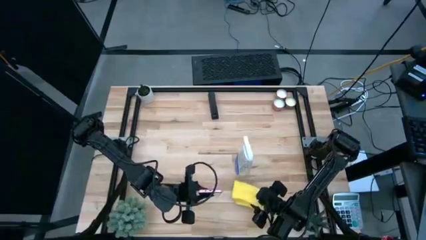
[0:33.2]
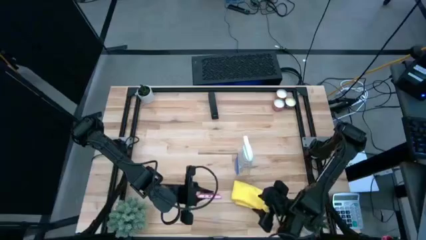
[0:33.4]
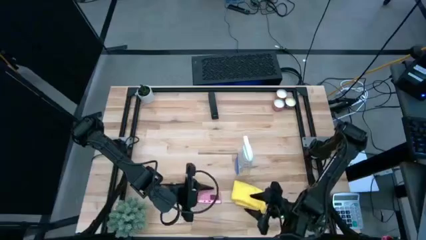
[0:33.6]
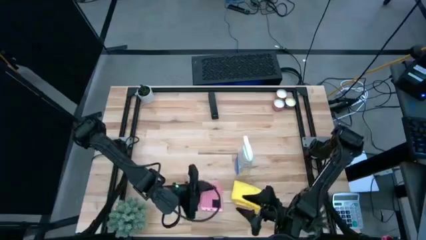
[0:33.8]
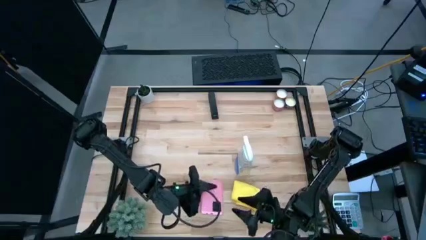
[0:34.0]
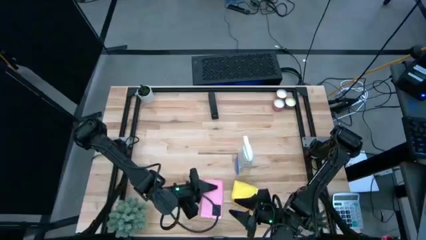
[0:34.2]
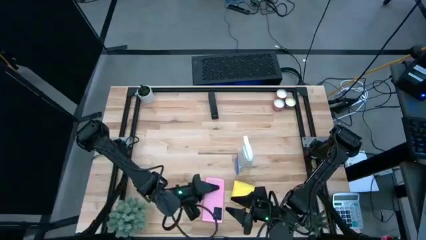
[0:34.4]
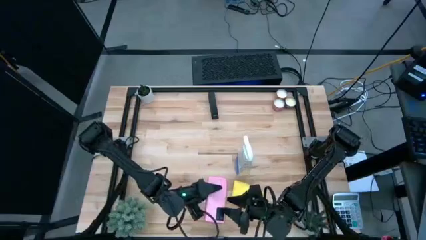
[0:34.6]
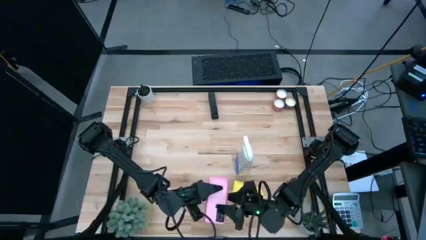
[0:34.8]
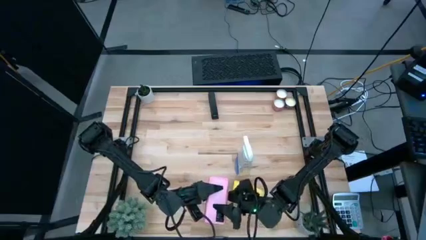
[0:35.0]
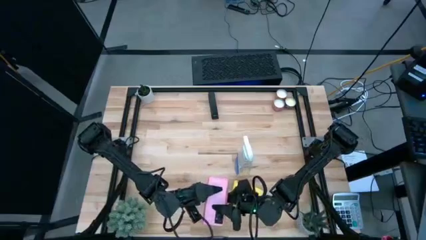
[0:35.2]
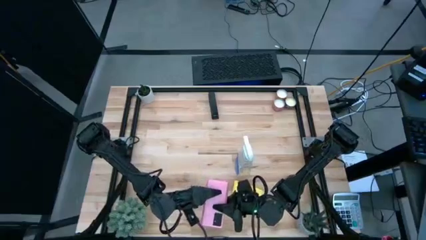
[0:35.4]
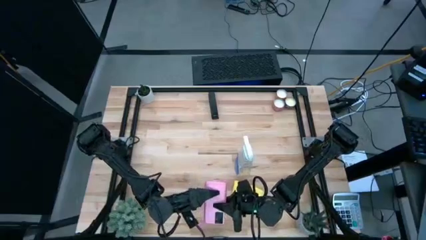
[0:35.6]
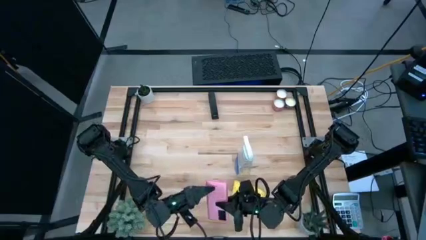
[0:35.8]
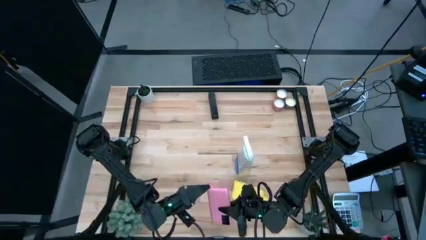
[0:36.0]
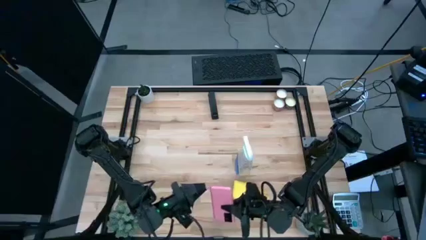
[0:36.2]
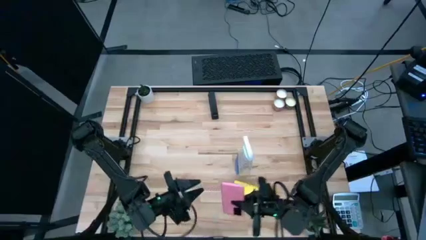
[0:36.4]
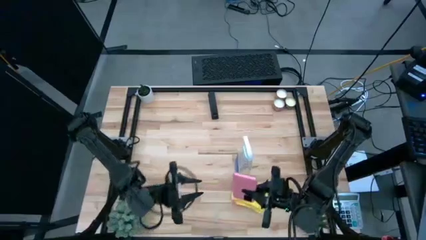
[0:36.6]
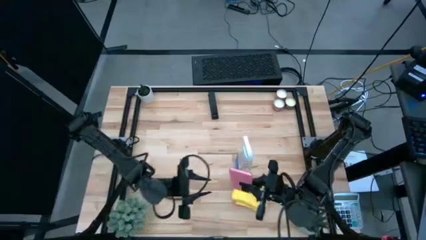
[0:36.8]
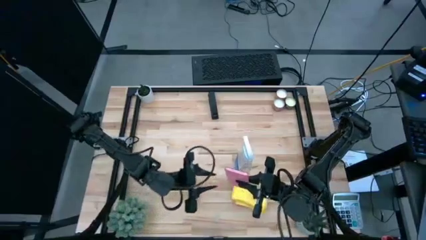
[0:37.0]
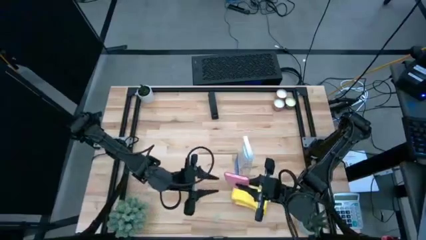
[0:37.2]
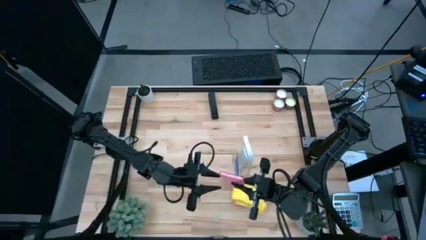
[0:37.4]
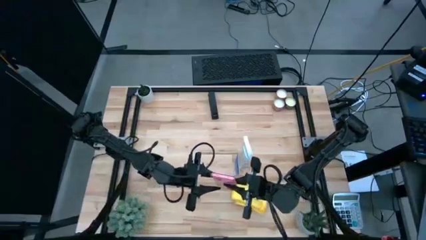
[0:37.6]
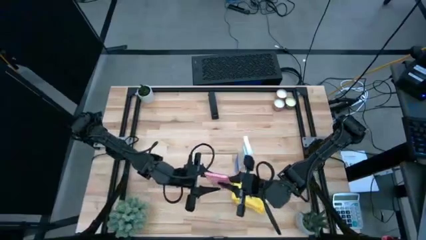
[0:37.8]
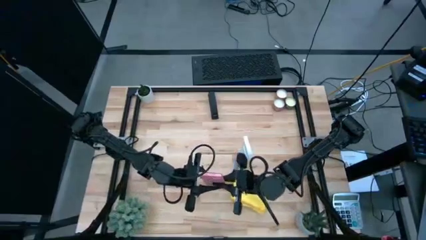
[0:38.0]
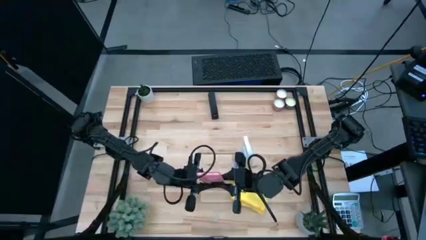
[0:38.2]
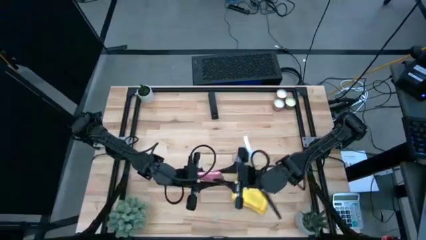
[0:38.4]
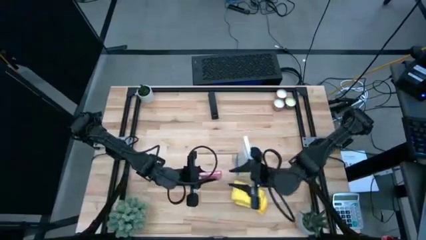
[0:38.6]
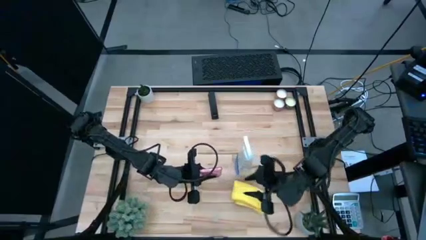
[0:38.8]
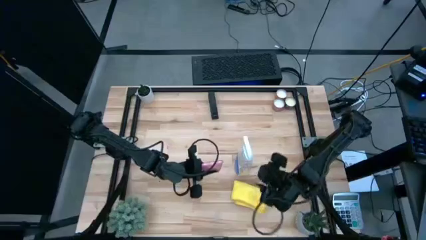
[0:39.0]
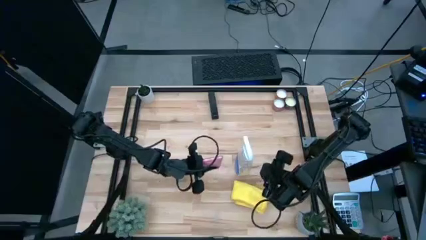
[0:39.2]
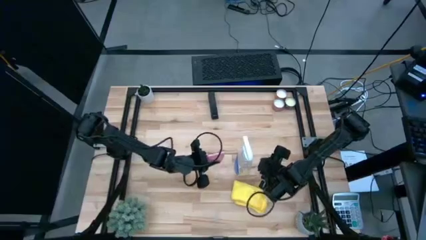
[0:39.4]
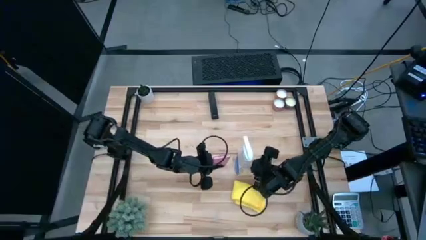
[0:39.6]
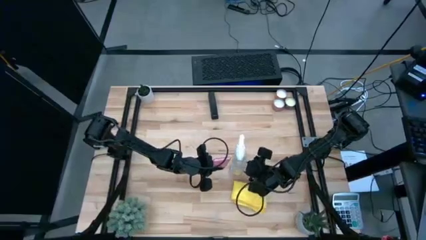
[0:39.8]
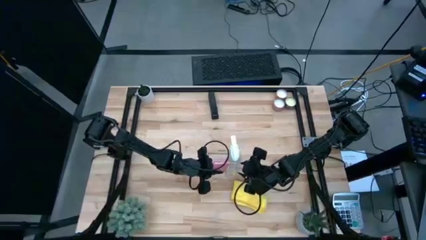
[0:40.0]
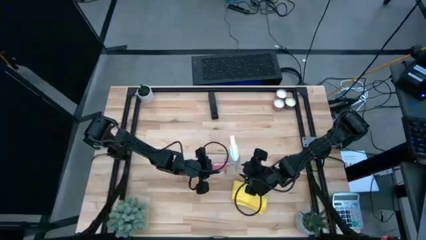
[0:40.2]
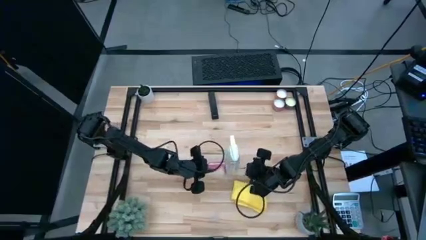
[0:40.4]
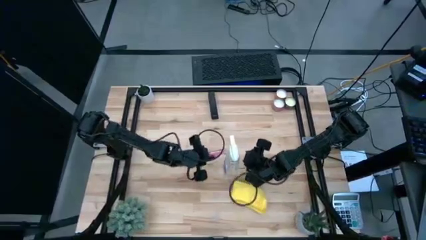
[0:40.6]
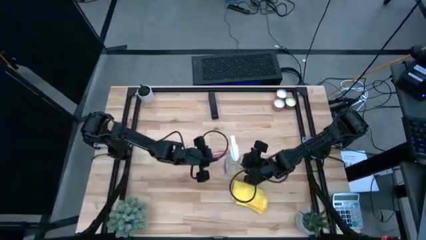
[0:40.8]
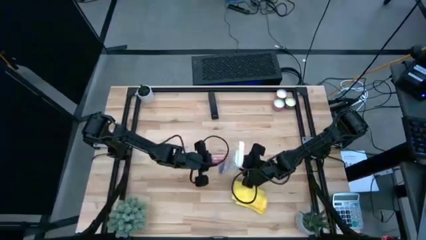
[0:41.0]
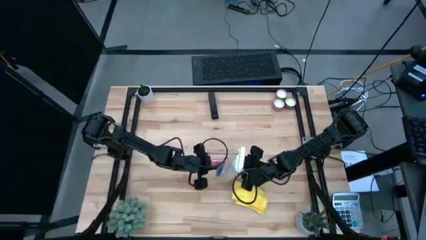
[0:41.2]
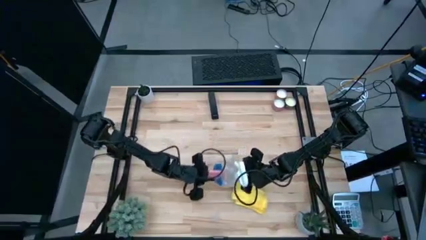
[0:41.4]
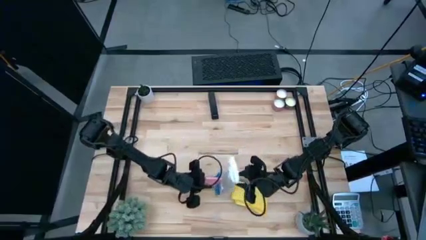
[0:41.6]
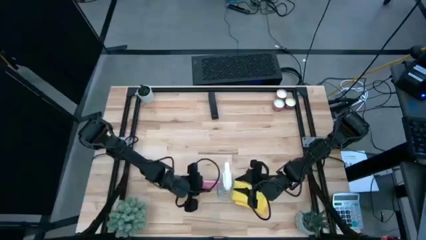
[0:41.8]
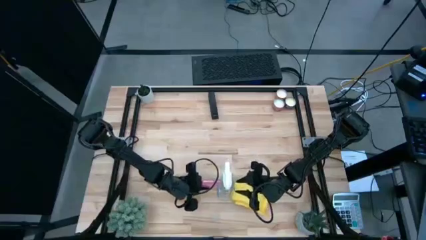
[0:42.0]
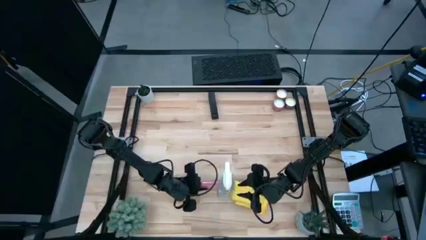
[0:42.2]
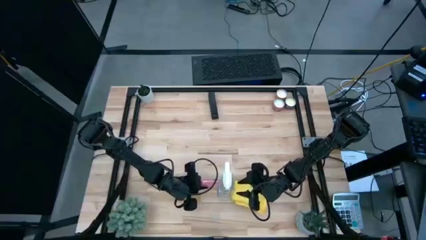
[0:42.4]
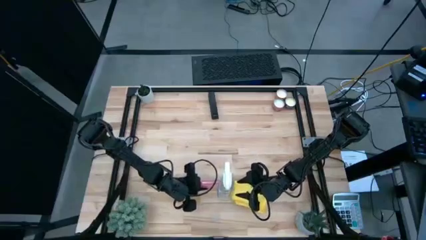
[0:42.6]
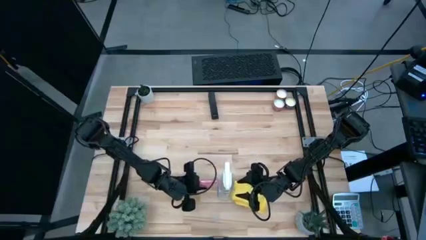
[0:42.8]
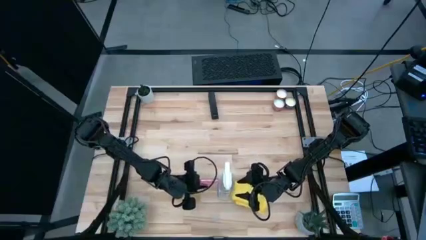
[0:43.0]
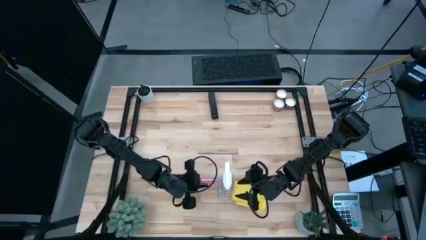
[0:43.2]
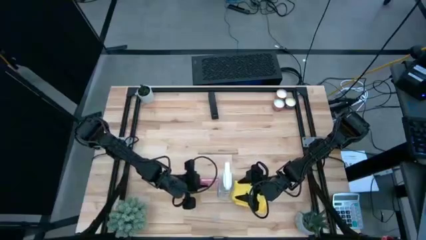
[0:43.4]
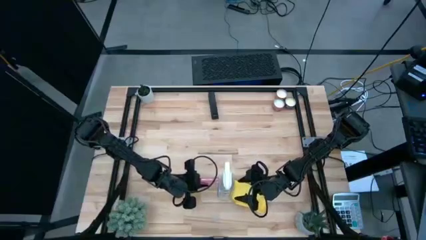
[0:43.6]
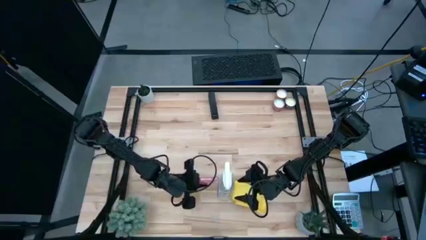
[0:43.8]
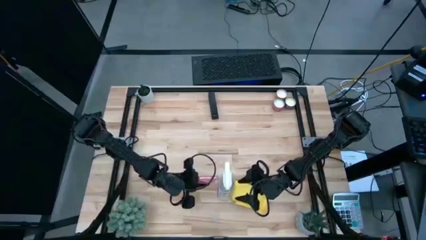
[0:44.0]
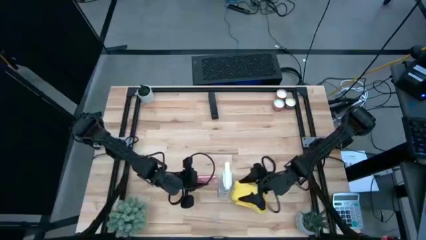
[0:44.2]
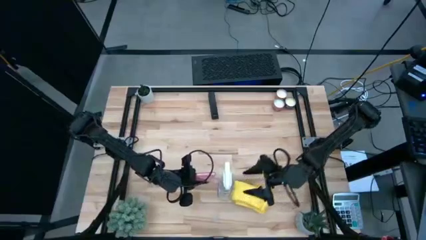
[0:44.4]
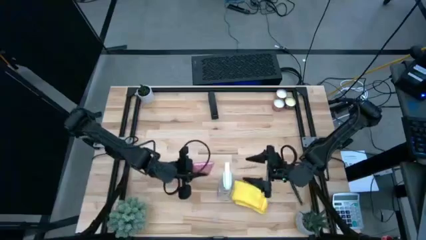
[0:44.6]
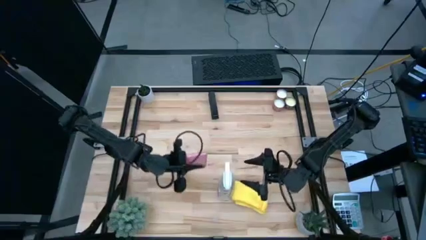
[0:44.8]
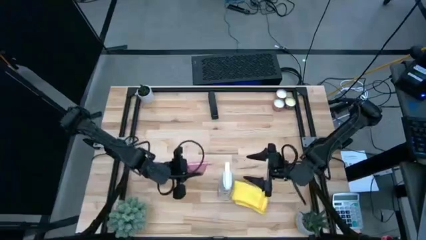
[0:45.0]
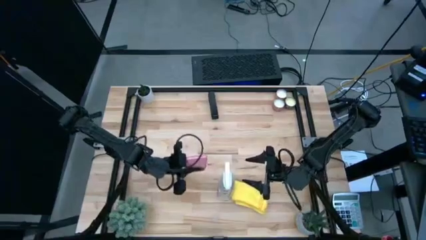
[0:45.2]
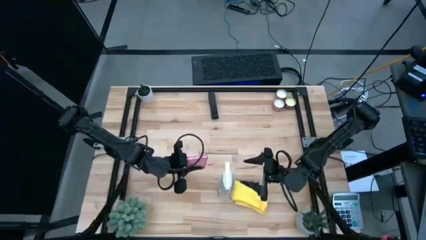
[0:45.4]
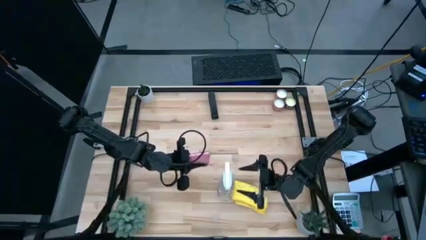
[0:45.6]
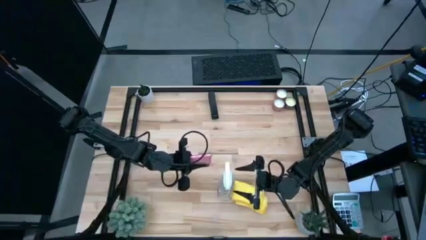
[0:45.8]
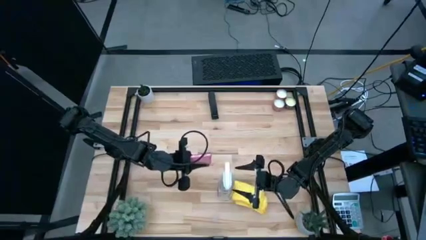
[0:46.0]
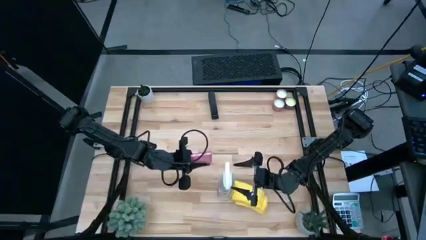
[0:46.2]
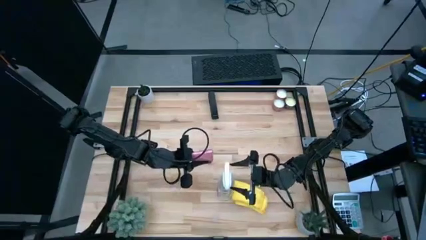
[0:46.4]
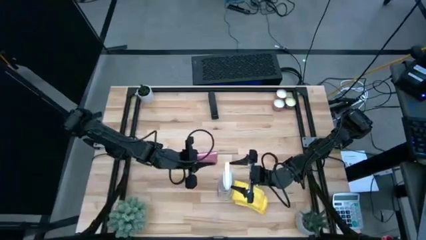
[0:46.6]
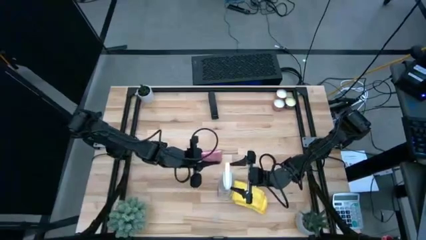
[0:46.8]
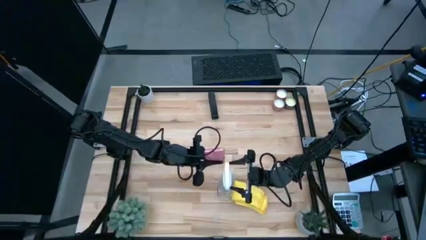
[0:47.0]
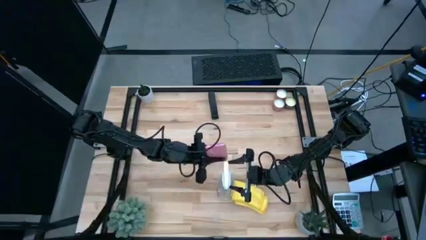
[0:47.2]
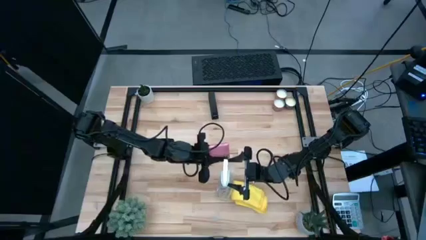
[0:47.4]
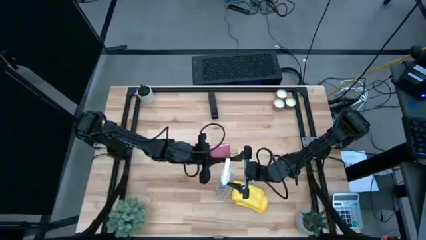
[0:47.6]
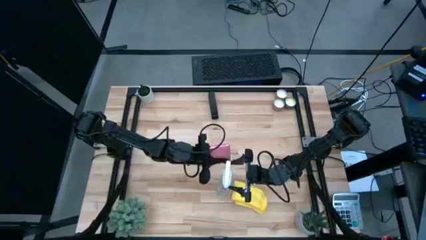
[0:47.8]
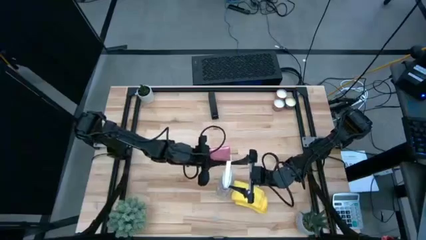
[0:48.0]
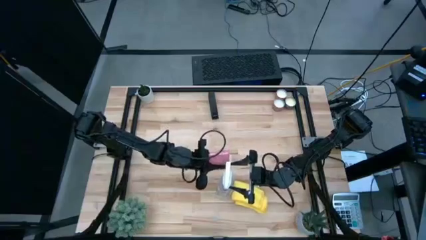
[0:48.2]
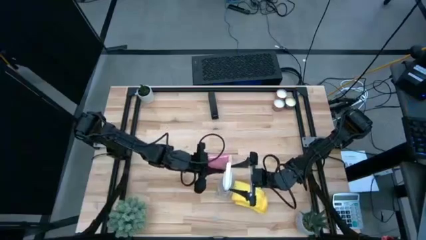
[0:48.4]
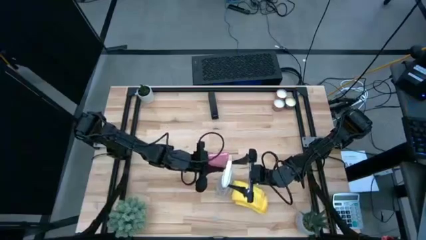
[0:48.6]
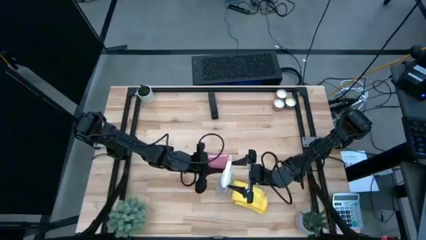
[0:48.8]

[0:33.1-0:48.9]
Task: Apply microfiber cloth
Spray the back of the pink cellphone using the white spray bottle

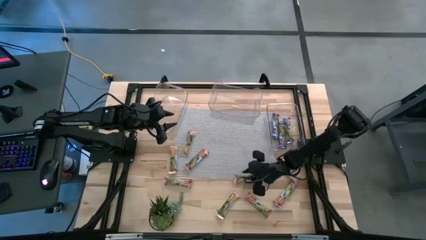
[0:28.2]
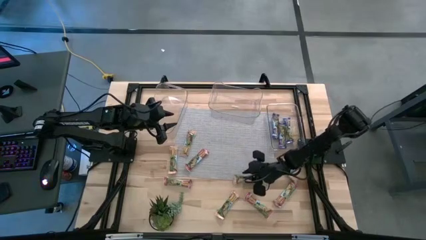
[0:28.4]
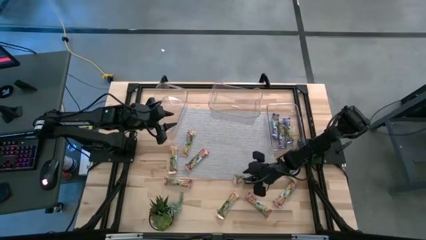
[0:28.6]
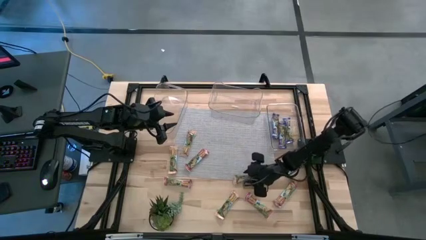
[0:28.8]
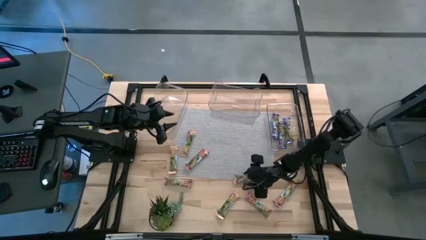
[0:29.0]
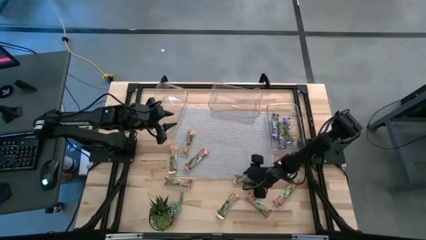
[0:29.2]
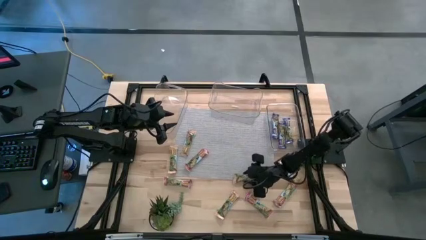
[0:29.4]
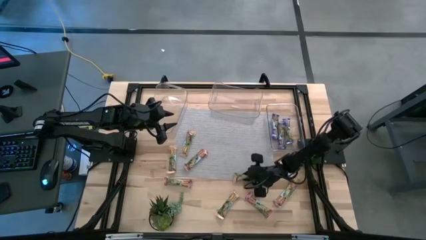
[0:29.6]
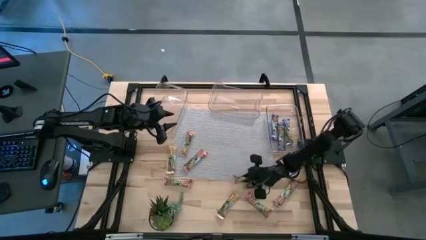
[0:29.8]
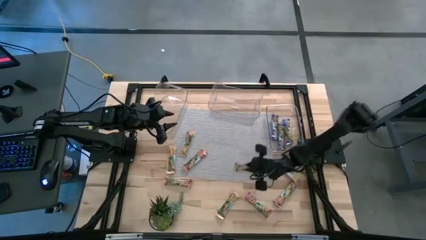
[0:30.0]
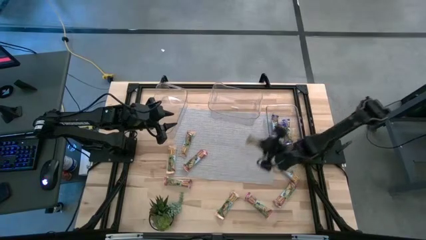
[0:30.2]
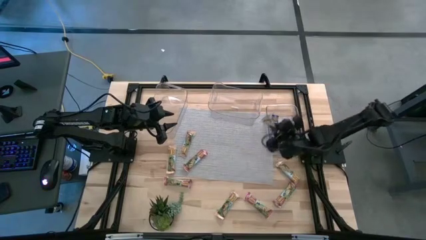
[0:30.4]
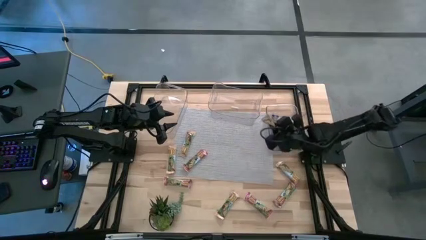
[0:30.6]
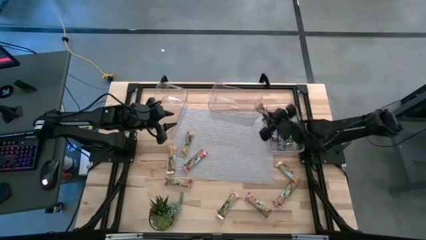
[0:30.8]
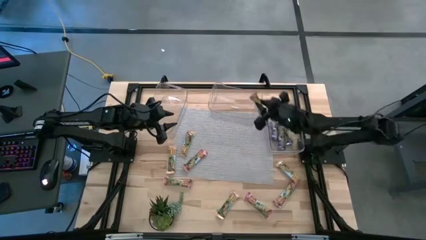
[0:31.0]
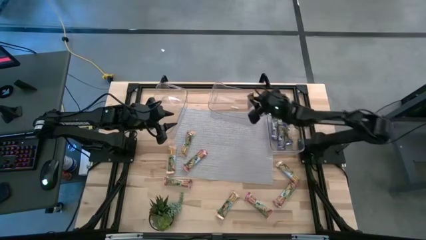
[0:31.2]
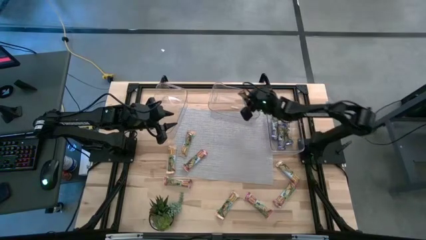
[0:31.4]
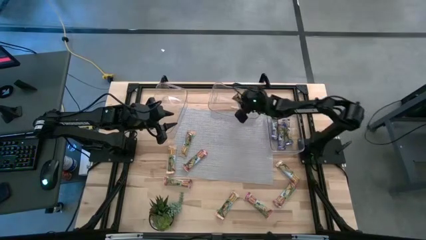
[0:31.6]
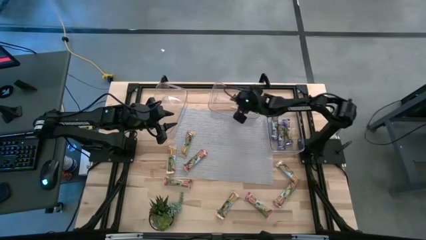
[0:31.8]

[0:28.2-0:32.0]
Task: Pick and place Granola Bars by type
Put the yellow granola bar into the middle transparent bin
